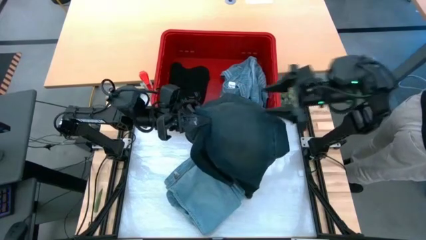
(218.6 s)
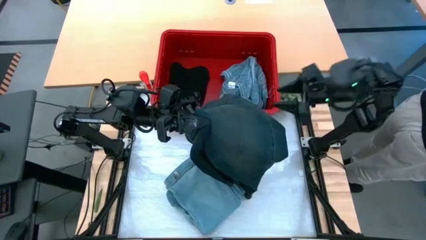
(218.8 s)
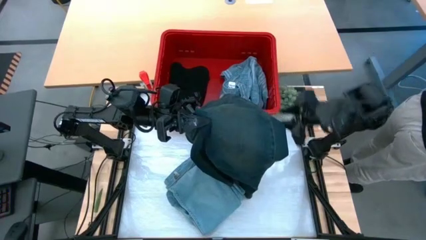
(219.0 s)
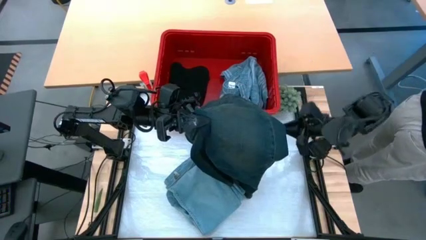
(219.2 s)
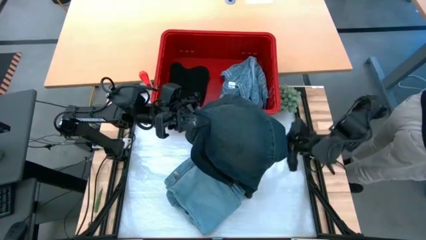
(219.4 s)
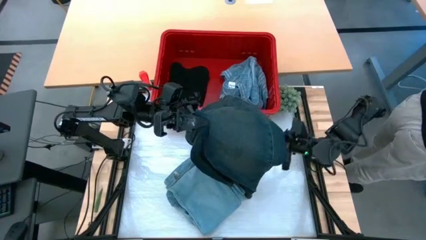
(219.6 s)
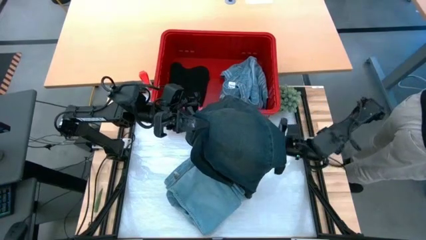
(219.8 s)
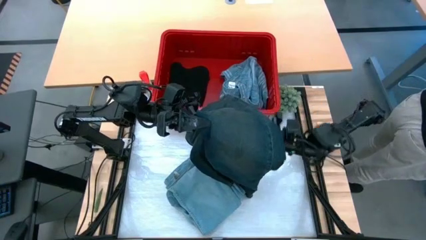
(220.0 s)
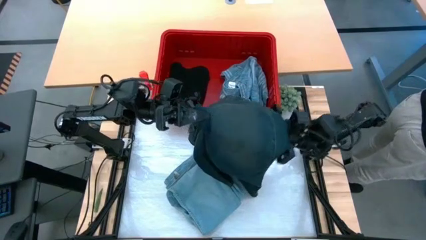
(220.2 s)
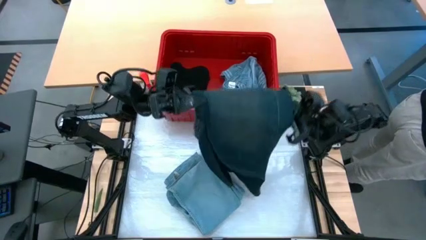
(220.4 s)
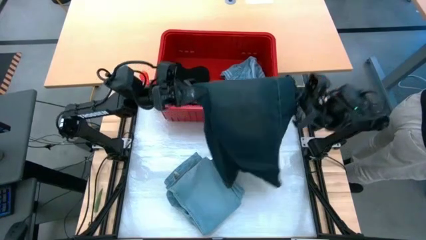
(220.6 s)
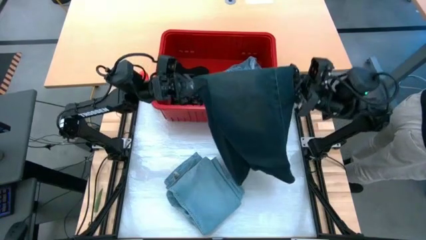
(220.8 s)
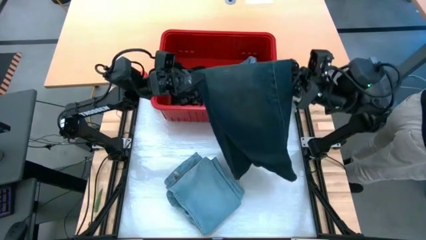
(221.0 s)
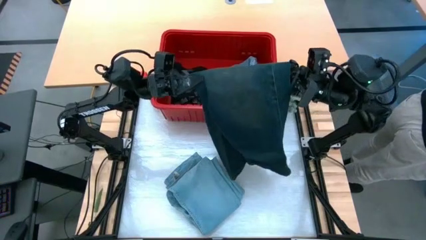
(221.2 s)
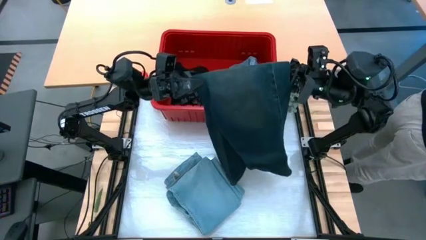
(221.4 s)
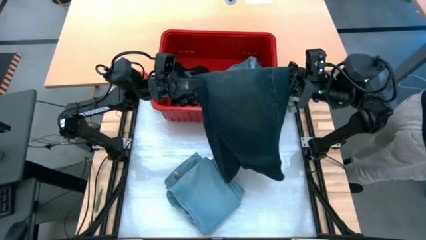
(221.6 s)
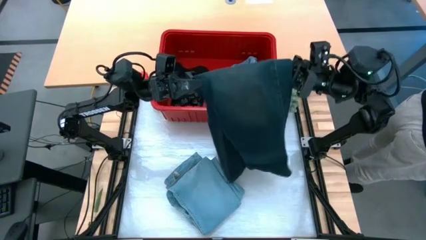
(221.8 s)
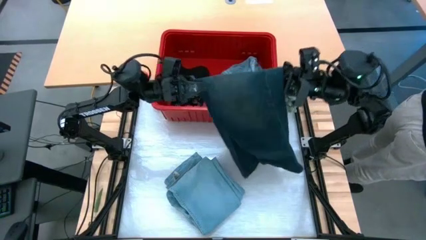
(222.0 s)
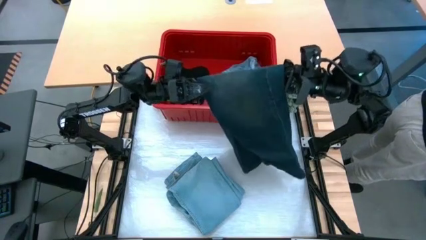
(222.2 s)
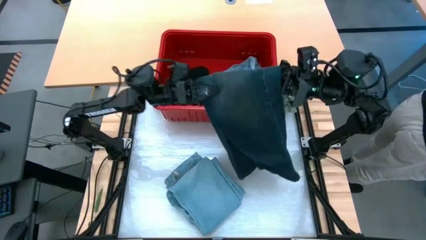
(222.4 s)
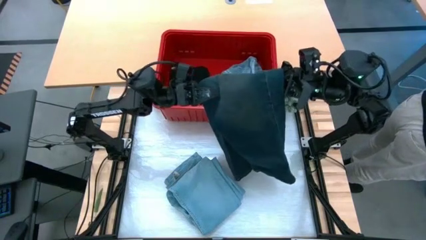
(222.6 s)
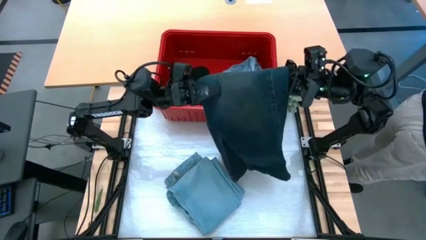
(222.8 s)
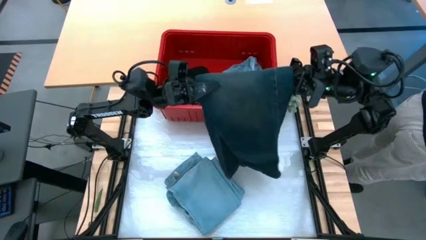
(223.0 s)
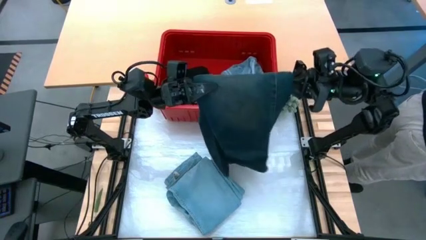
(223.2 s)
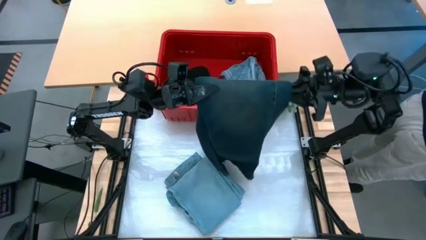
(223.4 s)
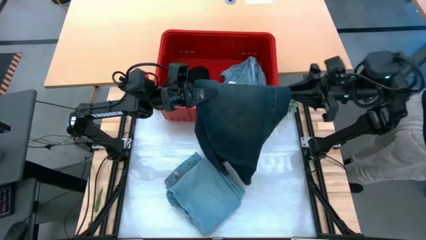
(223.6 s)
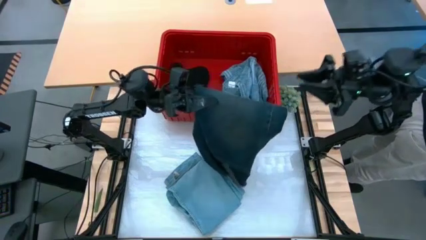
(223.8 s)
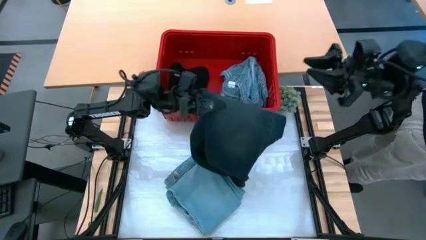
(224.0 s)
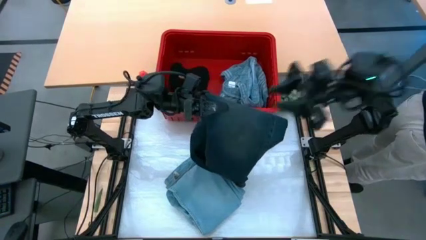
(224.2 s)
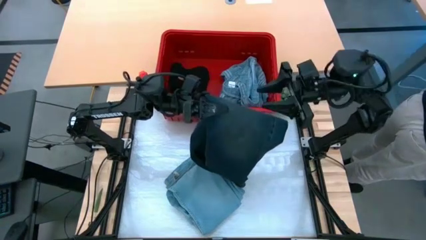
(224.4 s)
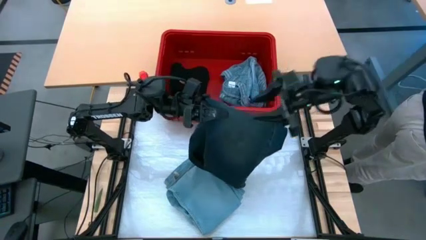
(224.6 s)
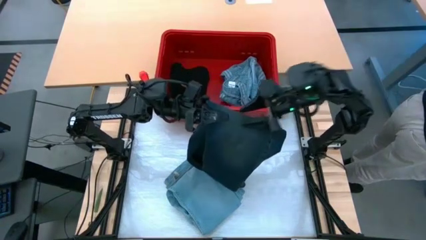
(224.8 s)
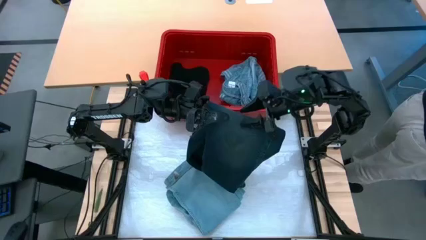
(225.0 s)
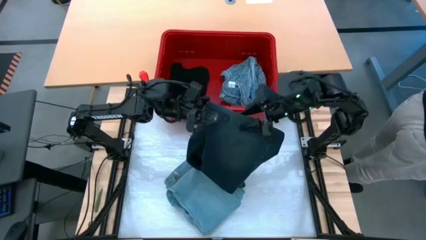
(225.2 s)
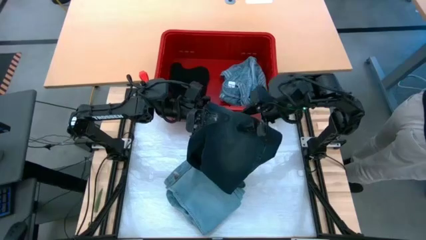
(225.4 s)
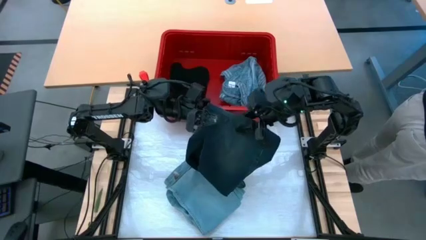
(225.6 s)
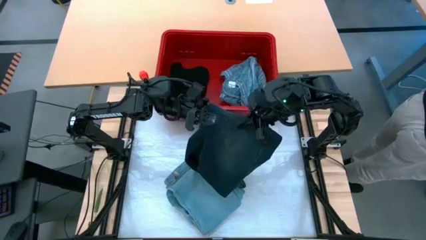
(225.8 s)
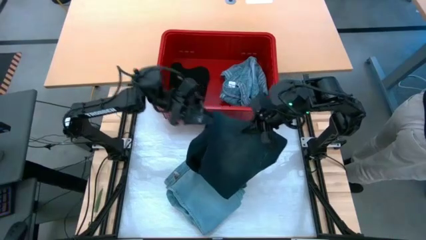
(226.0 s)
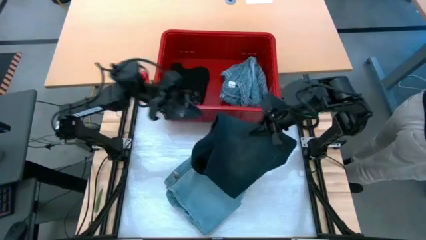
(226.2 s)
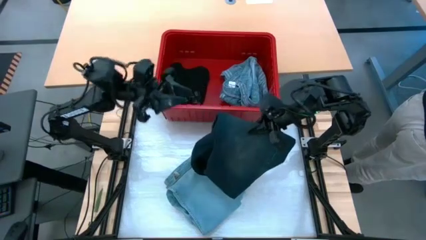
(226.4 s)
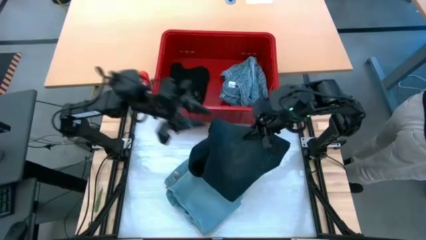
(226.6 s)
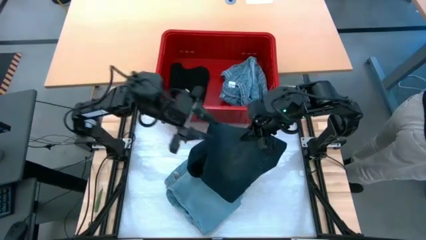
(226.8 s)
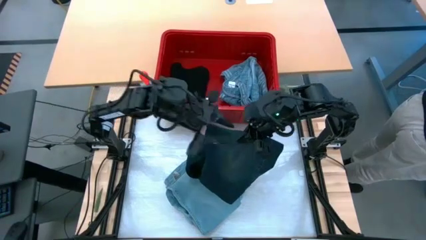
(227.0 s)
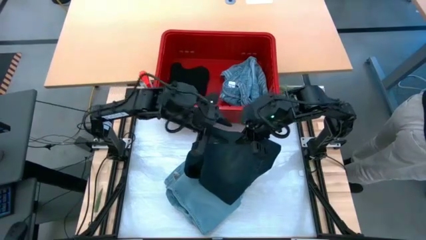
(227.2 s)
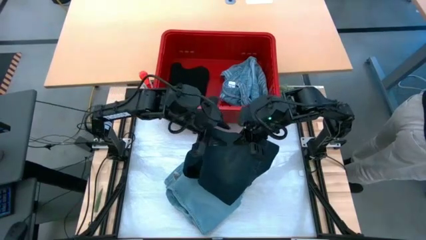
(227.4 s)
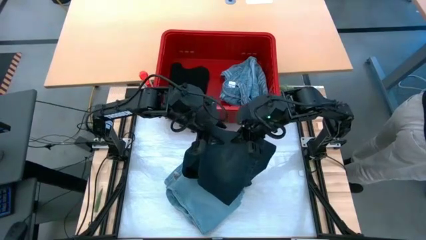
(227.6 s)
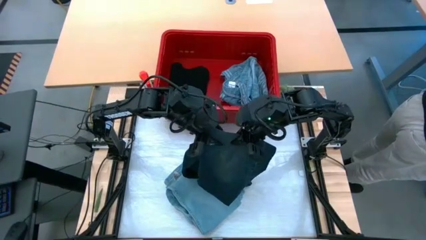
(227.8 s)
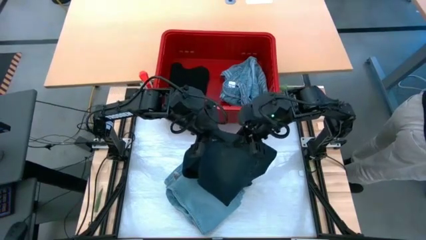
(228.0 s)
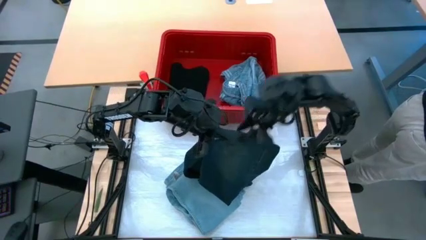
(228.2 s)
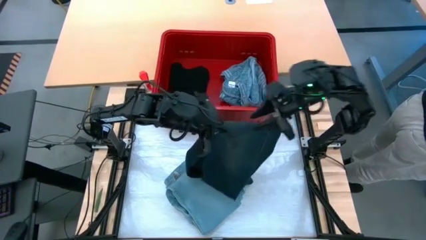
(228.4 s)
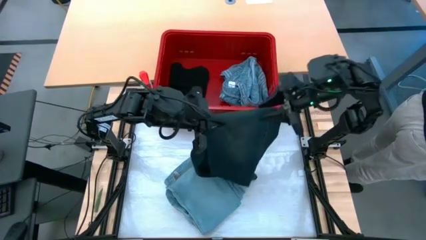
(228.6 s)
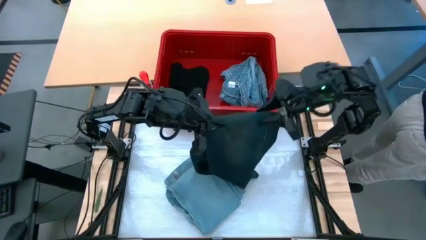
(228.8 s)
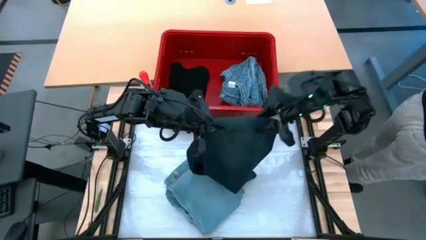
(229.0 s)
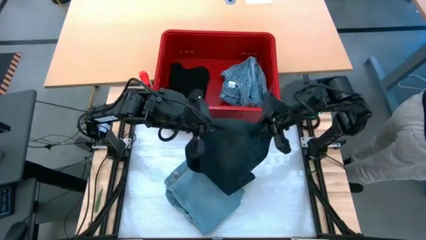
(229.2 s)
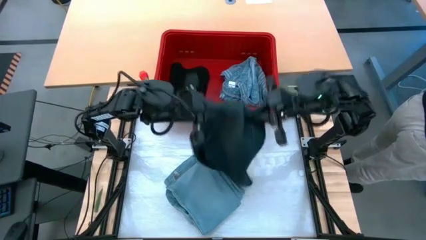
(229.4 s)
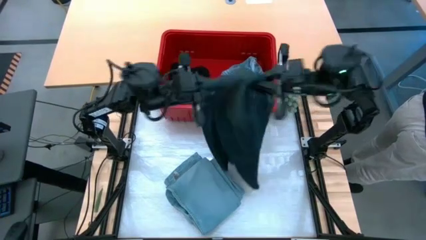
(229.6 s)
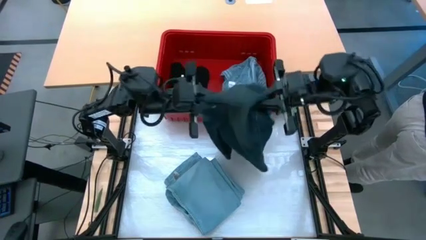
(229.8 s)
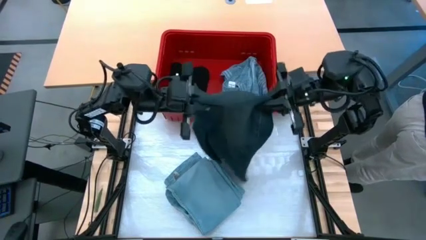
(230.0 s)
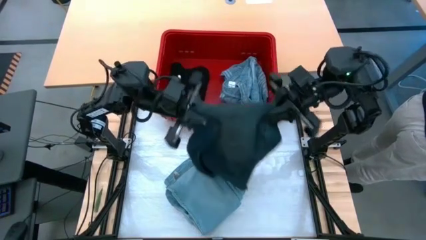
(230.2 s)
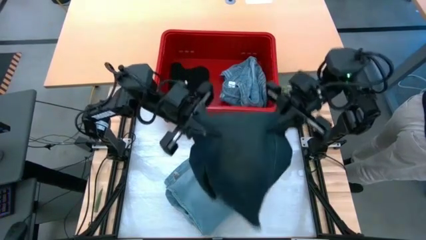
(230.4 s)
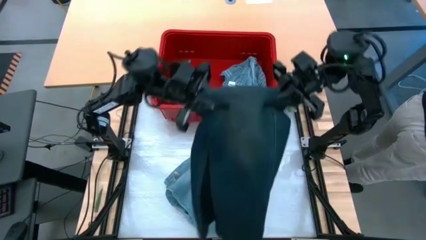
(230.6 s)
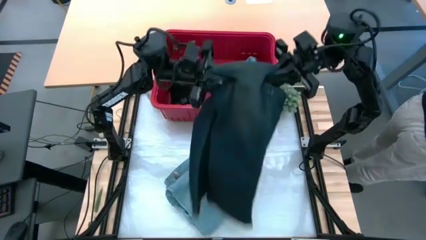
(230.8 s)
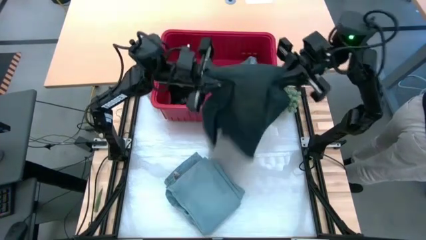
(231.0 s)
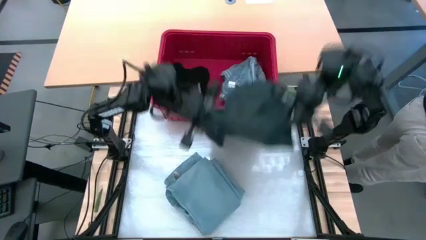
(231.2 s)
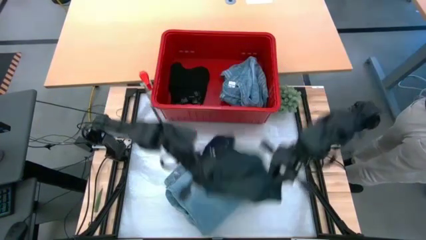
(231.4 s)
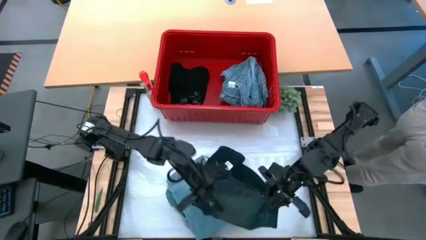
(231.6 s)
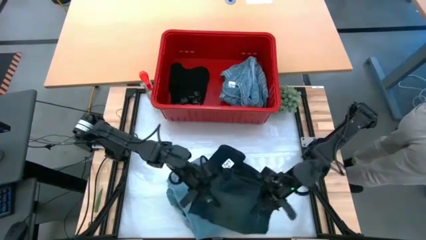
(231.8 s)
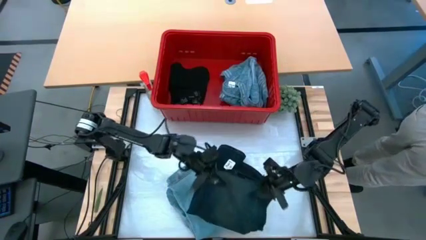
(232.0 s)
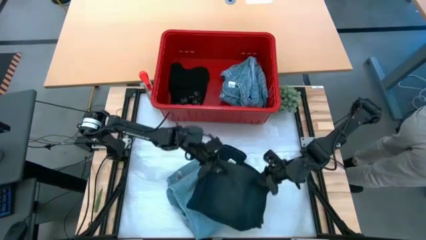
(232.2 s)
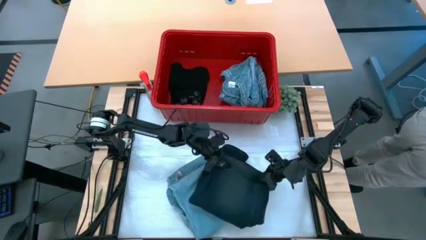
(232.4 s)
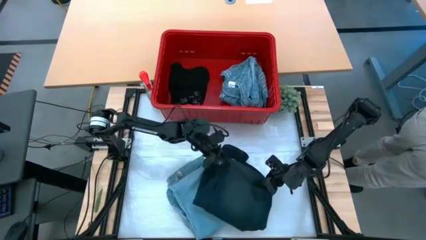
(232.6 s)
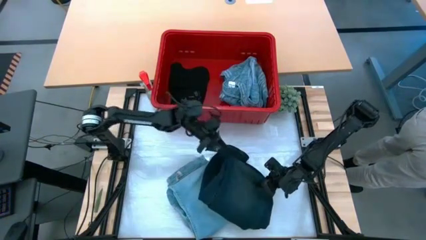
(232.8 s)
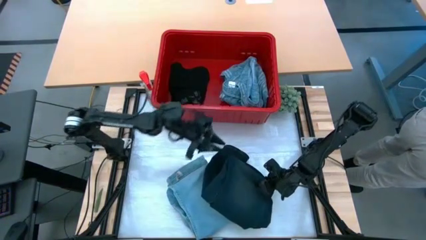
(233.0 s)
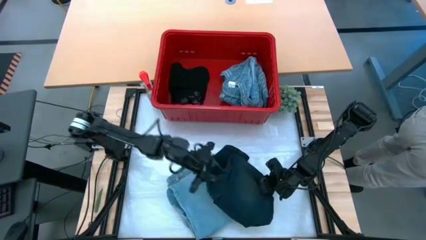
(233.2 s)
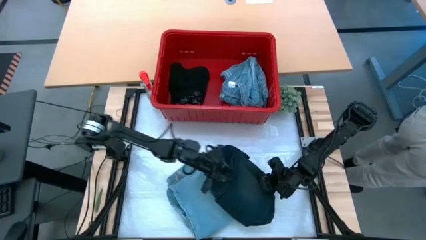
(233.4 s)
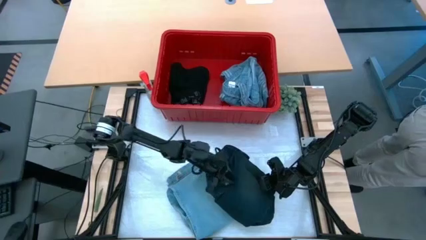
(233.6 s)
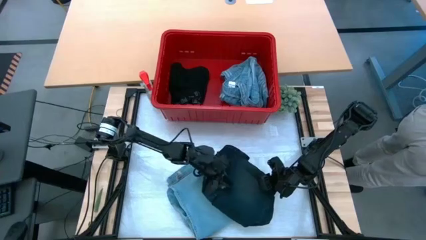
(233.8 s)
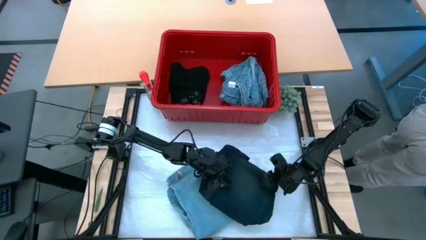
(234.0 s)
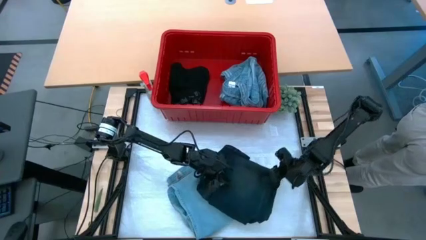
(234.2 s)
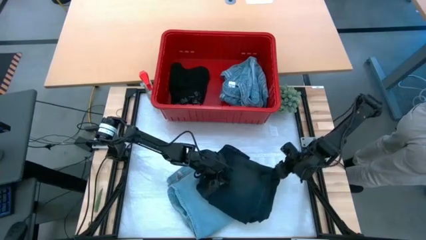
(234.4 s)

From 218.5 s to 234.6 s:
Task: Fold Laundry from Bin
Fold the dark blue pants
